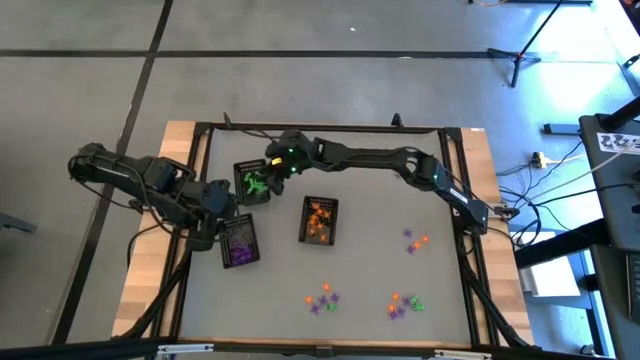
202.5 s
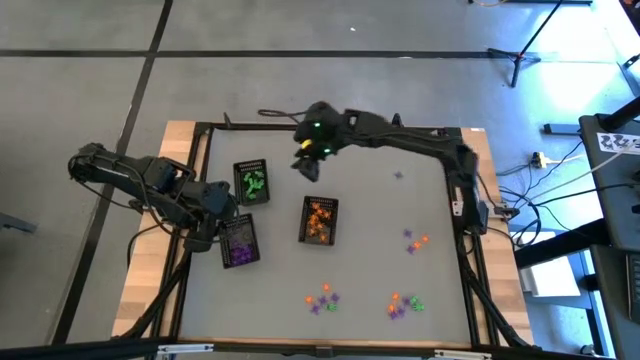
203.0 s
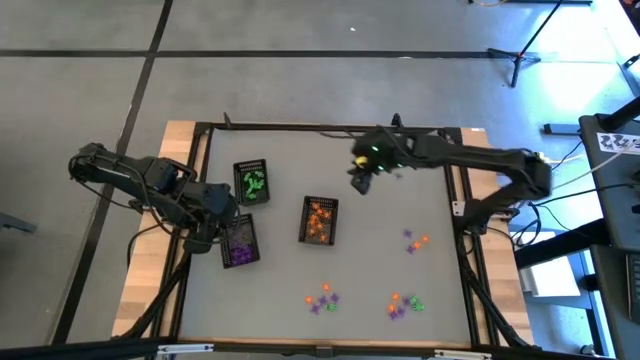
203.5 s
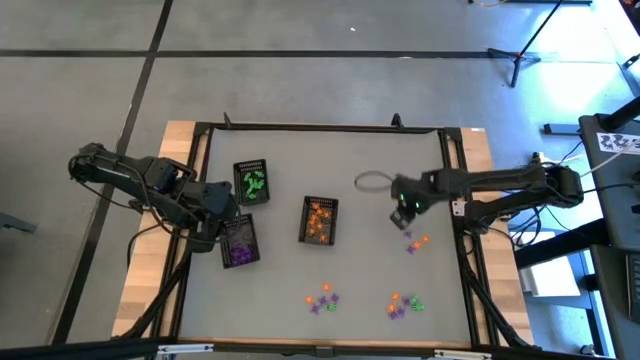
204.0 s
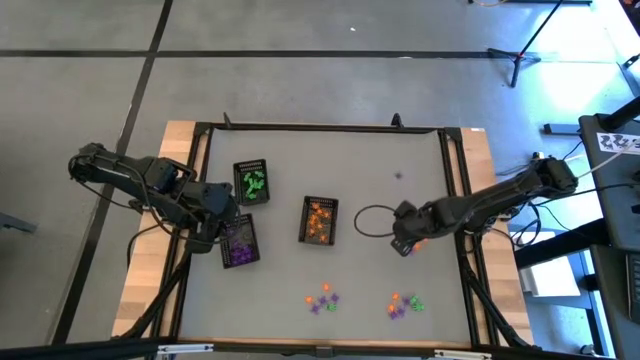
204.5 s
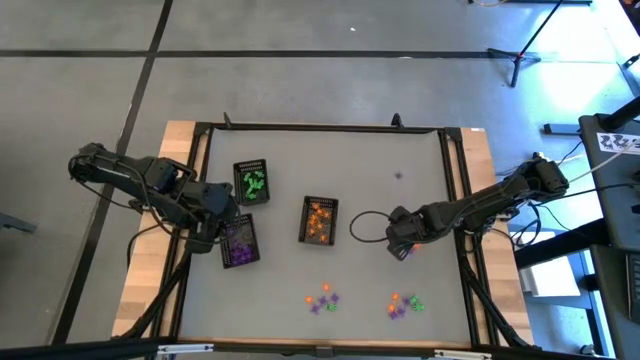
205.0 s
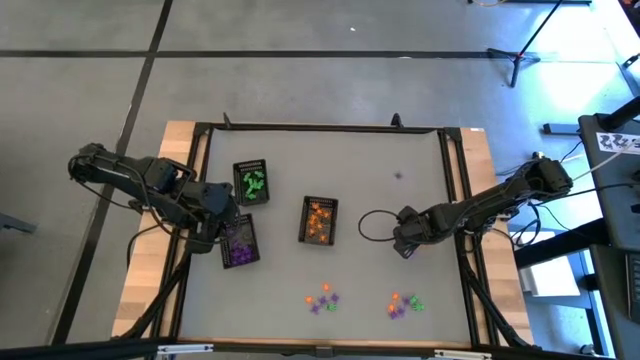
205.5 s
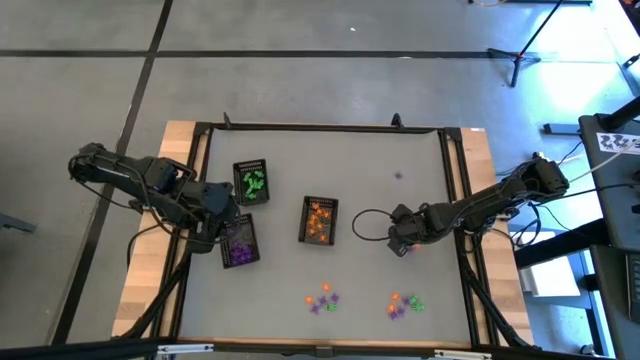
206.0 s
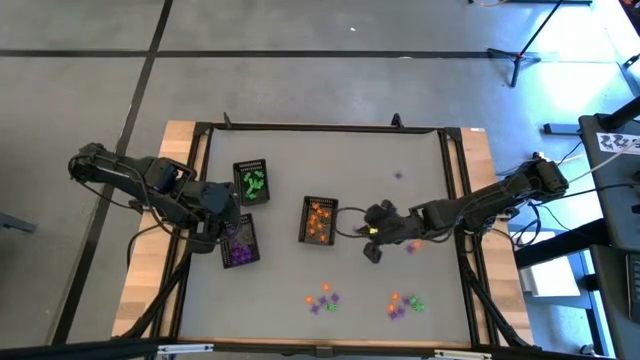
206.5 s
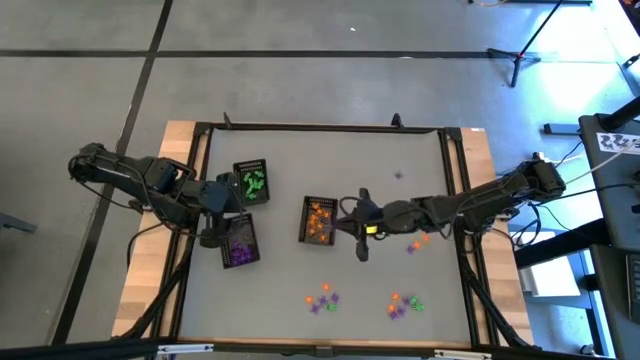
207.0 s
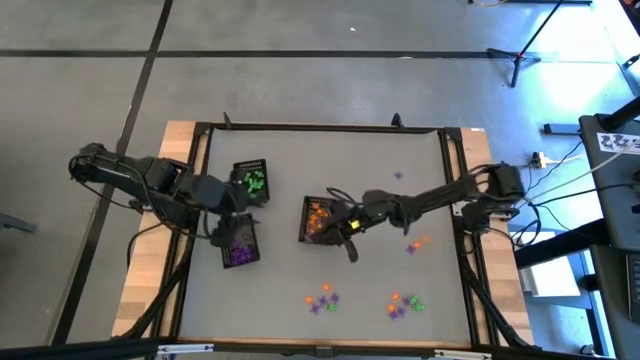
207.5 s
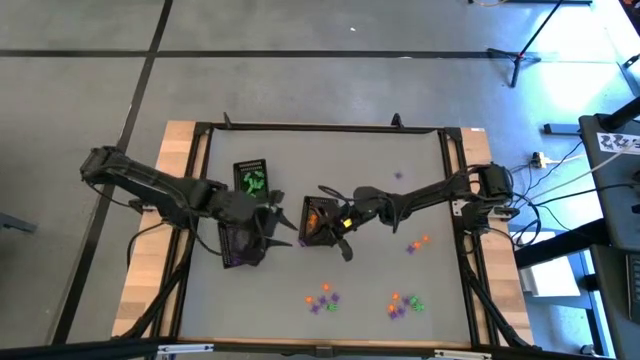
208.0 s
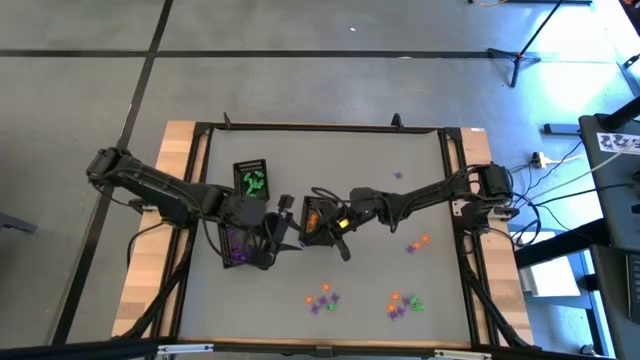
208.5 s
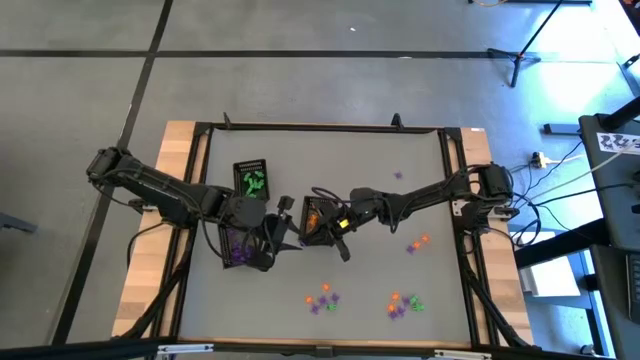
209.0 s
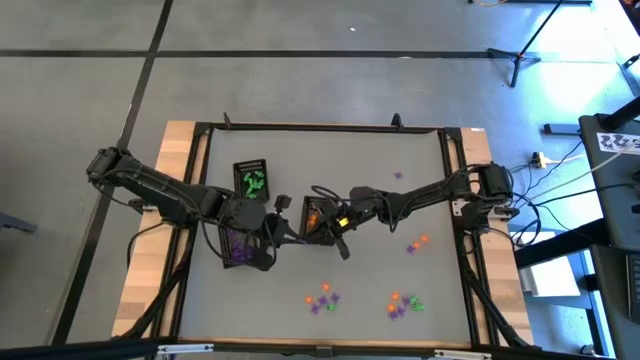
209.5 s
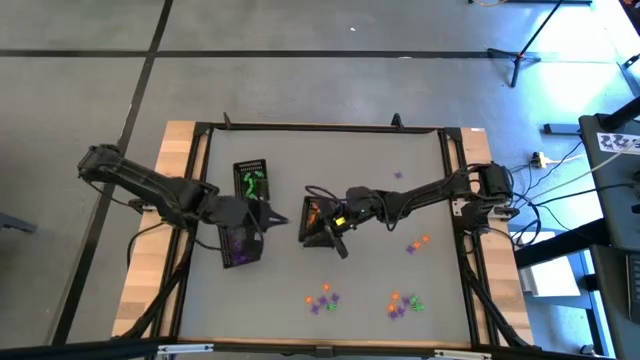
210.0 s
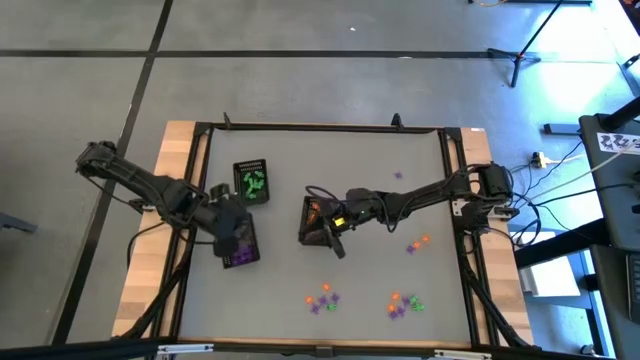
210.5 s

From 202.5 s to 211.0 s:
Task: Sort Halloween decoration
Put the purple spider toy into the bottom left black basket

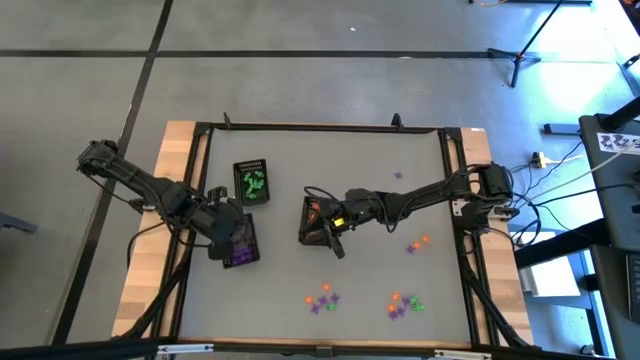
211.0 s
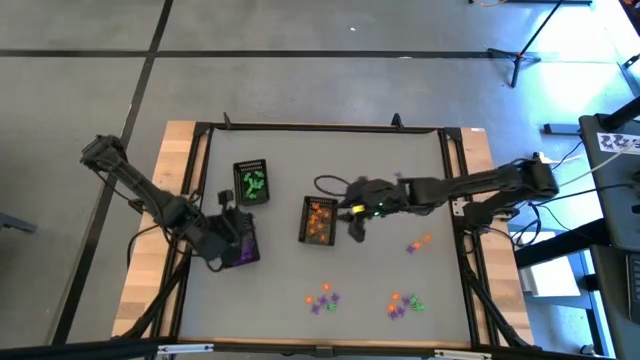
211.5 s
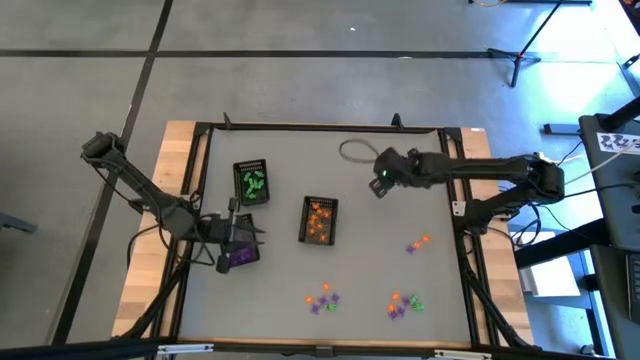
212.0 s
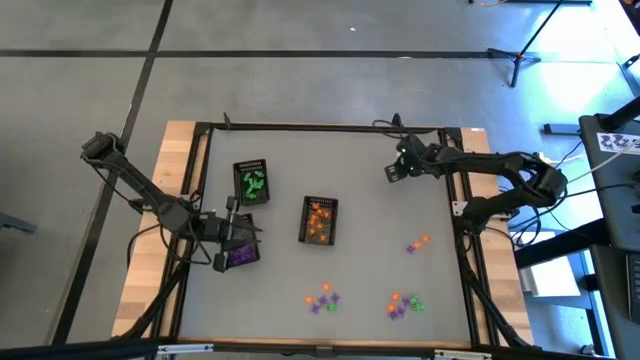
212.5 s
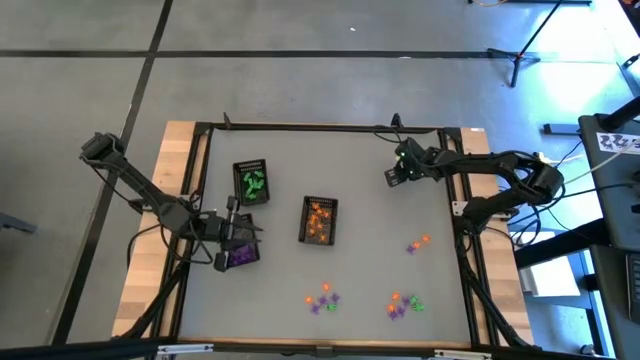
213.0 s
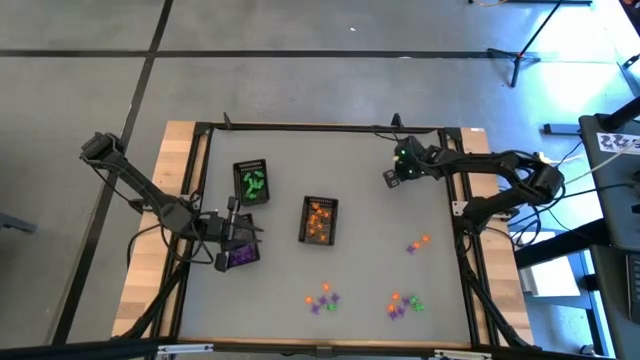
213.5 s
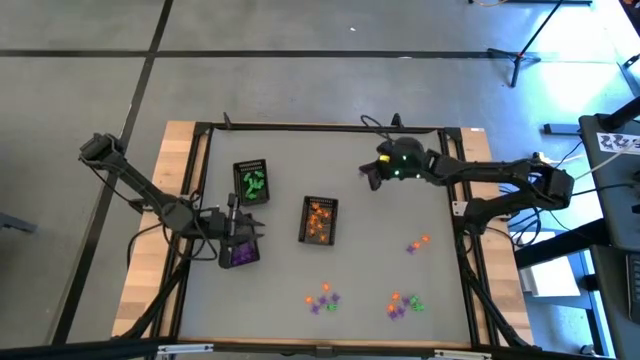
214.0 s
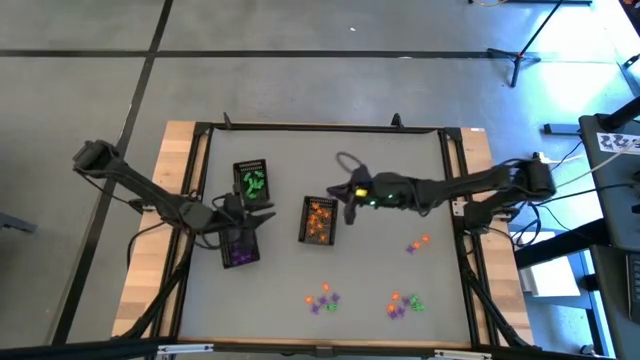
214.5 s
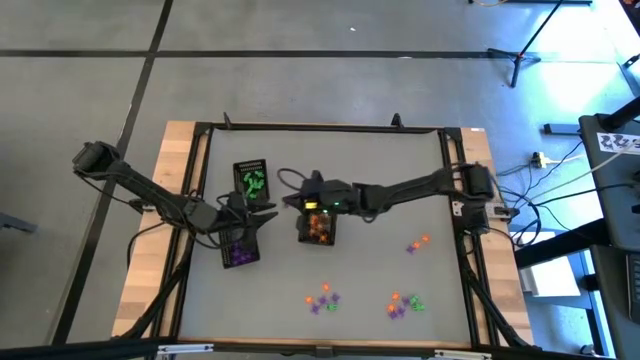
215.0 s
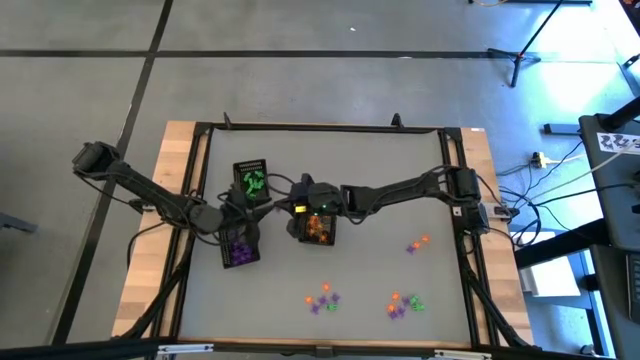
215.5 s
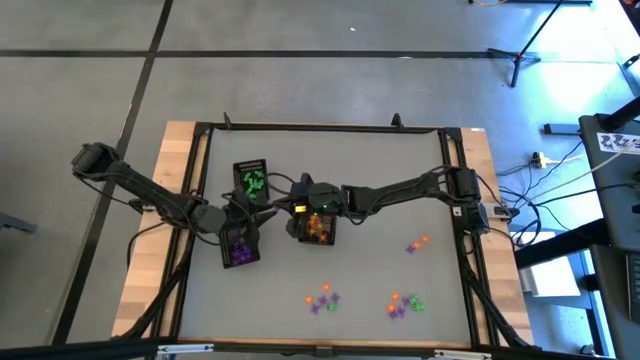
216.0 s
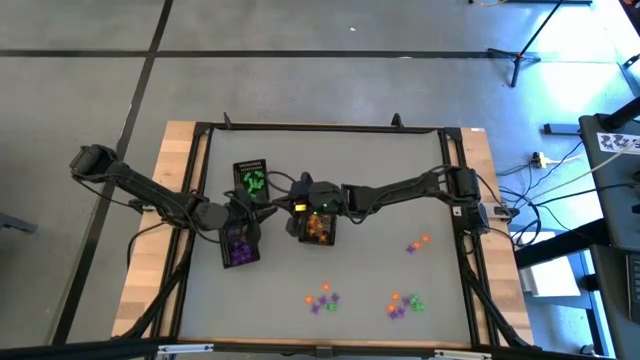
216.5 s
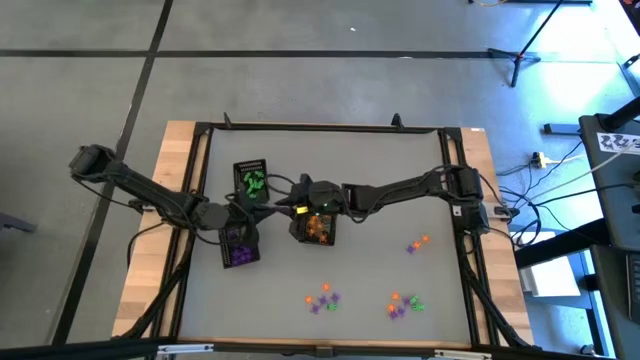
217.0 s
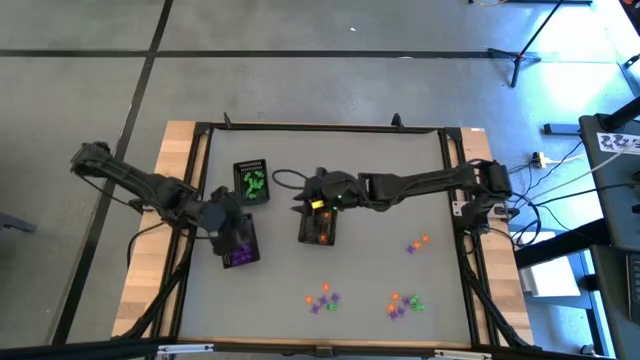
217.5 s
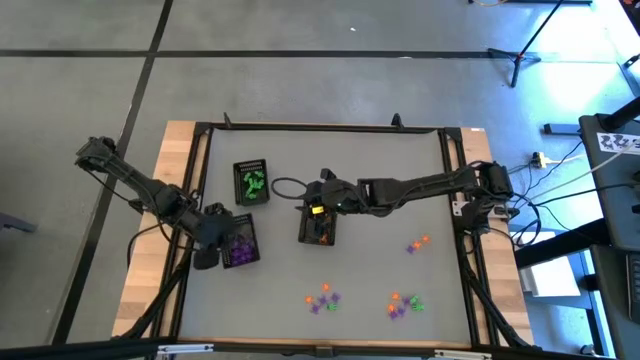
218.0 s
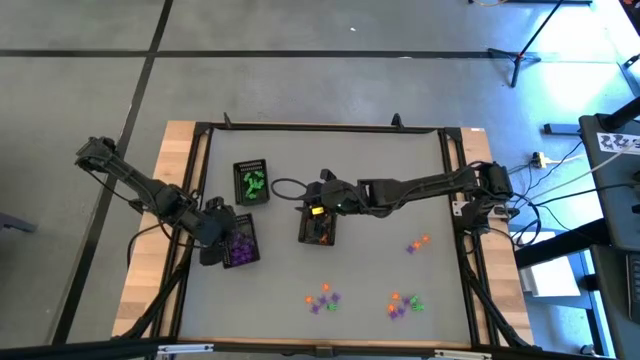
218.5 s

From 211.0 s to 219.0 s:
Put the purple spider toy into the bottom left black basket

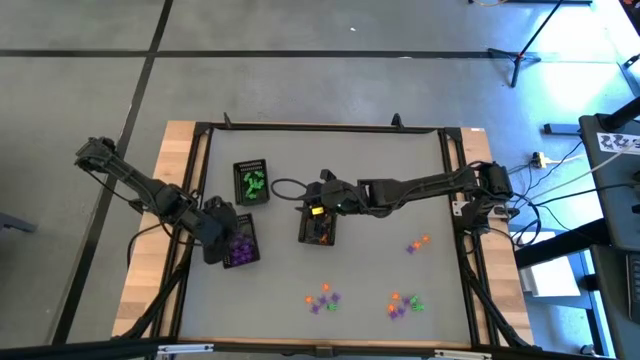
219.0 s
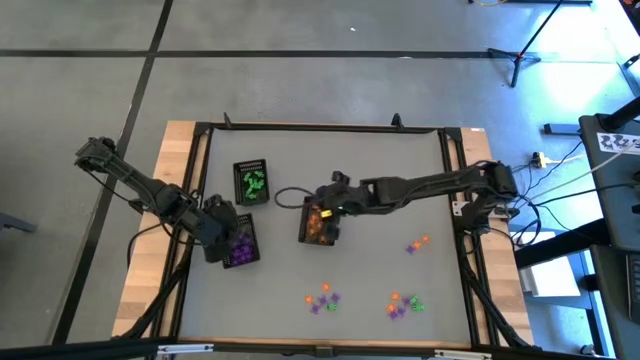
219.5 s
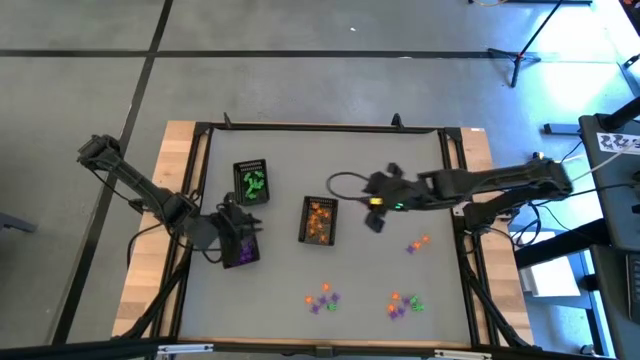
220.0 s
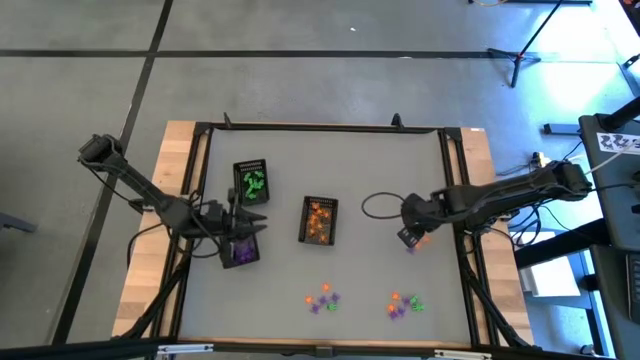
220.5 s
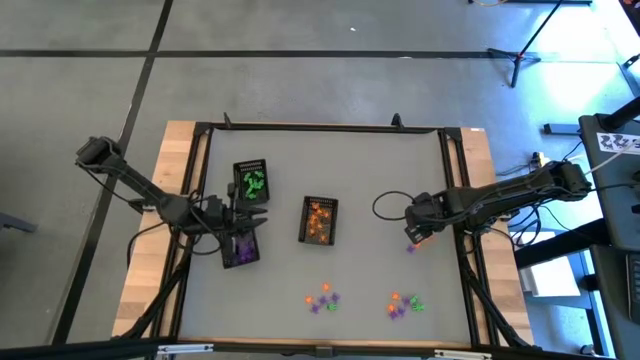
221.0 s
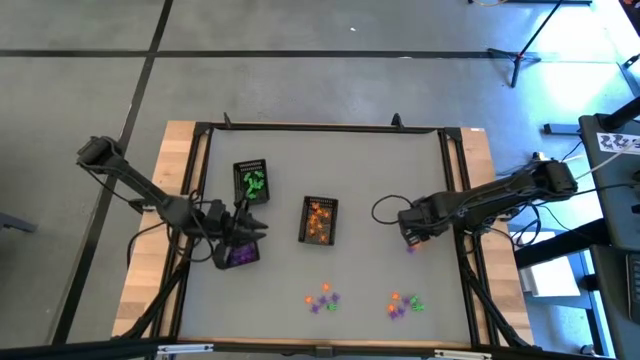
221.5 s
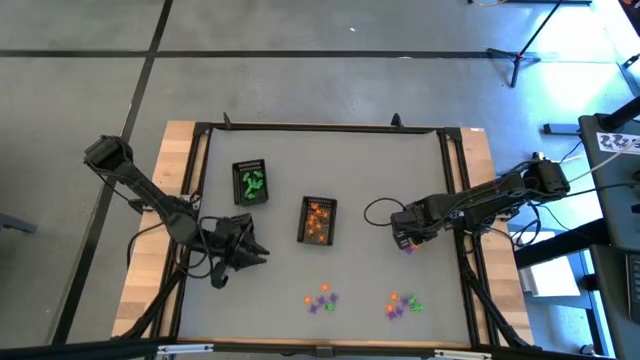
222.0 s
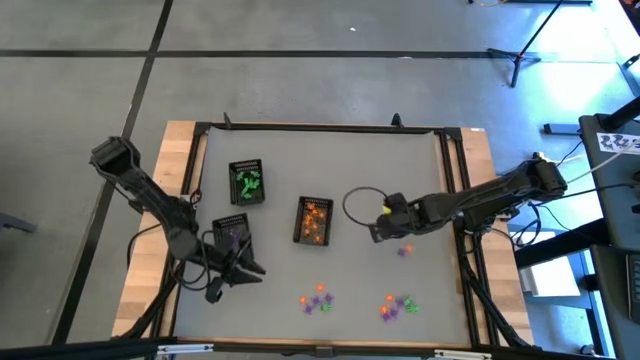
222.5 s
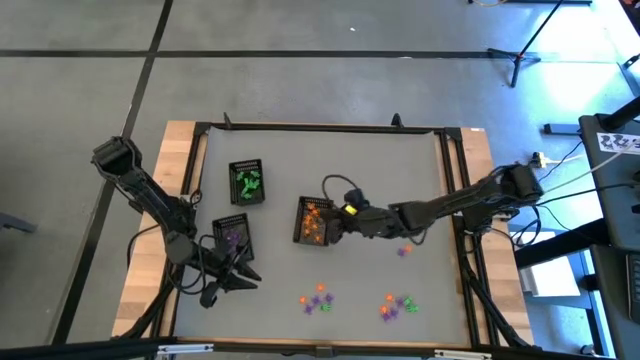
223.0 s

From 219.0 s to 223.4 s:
Put the orange spider toy into the bottom right black basket
